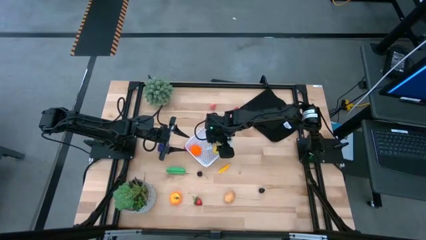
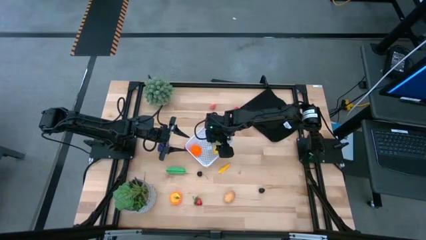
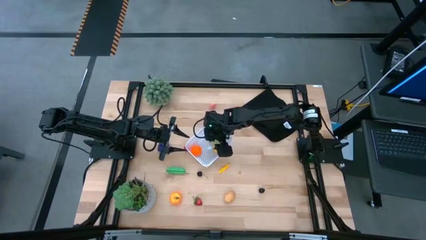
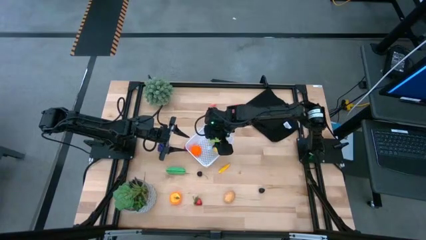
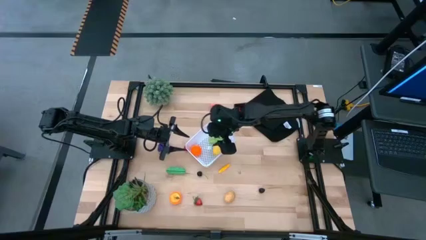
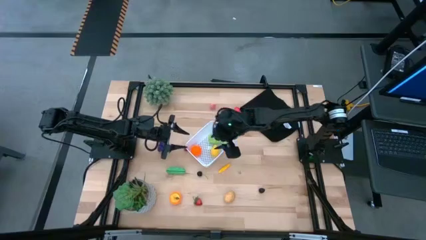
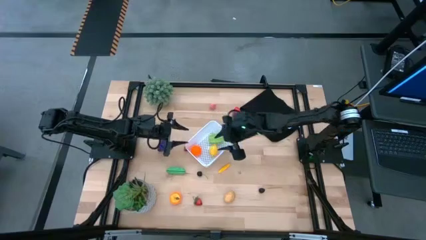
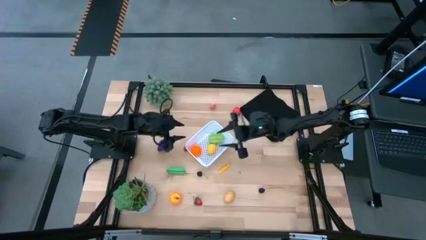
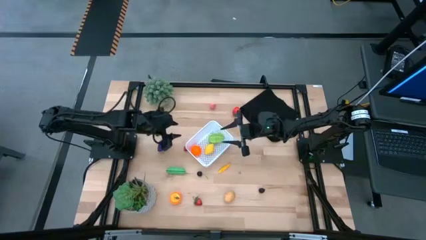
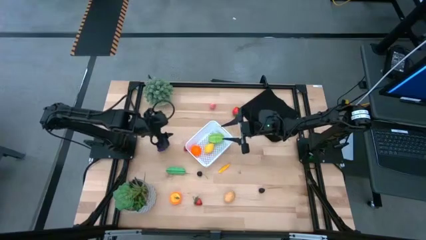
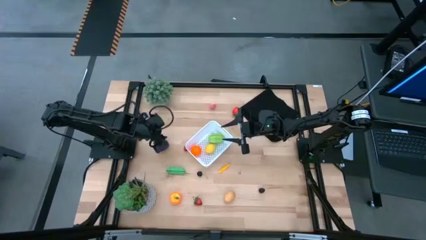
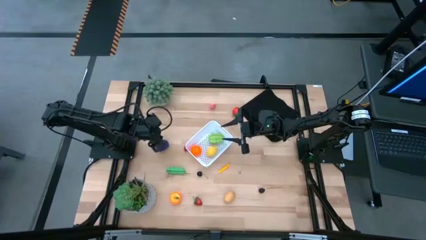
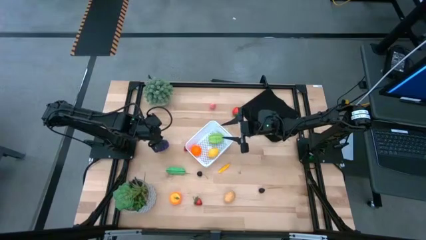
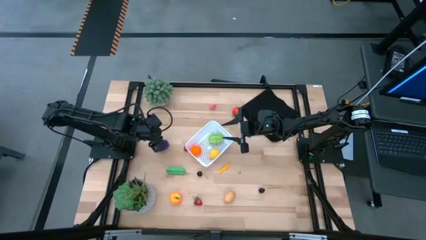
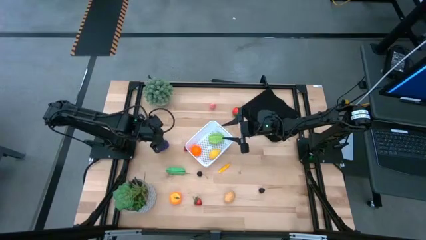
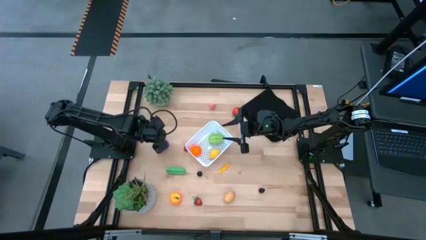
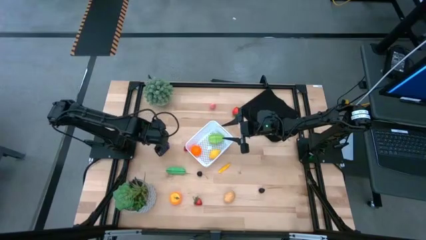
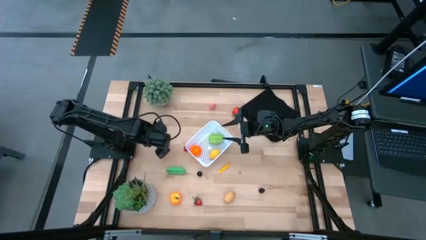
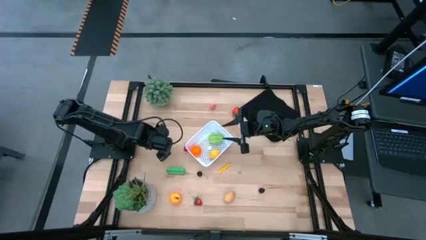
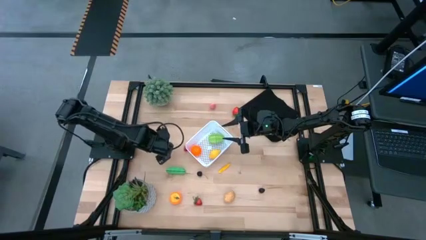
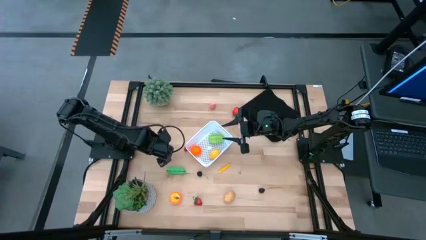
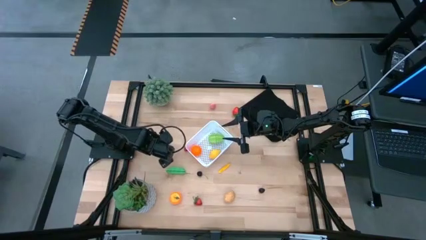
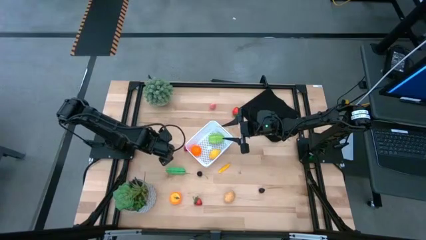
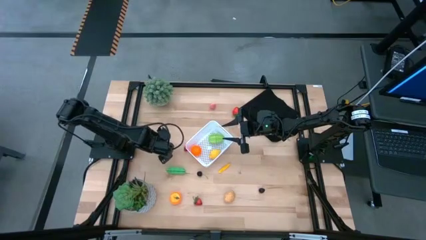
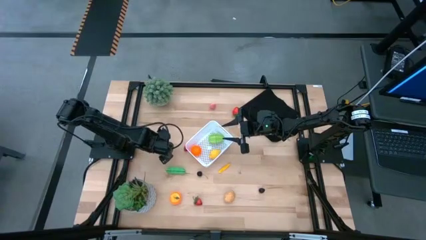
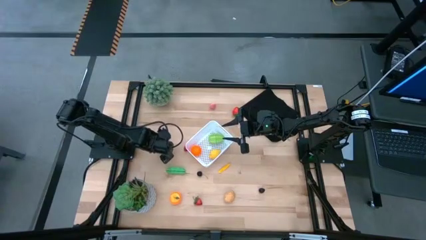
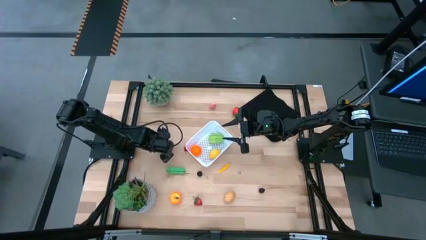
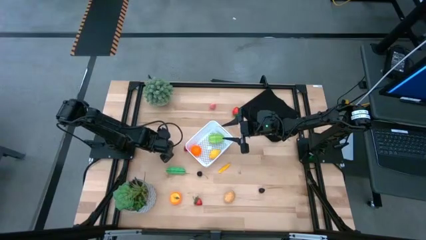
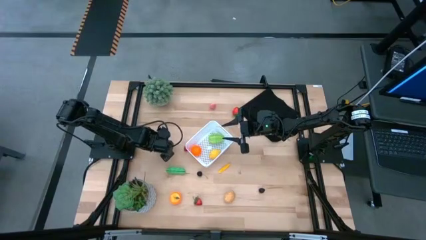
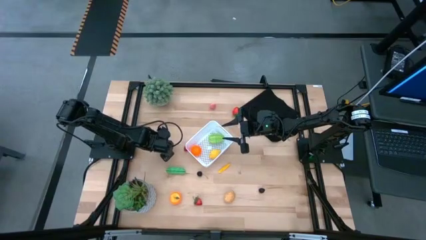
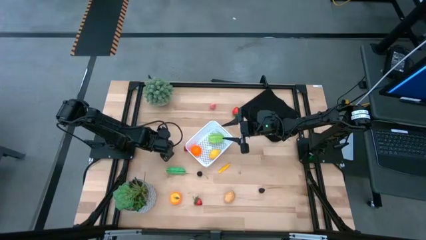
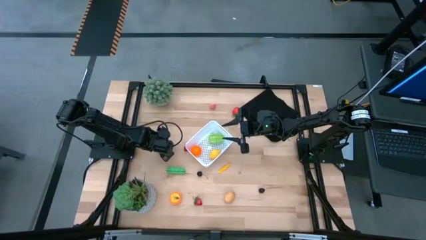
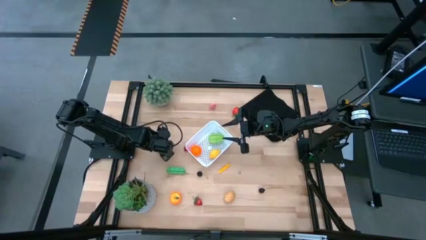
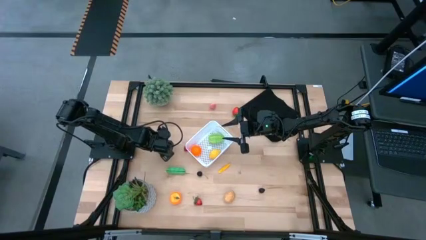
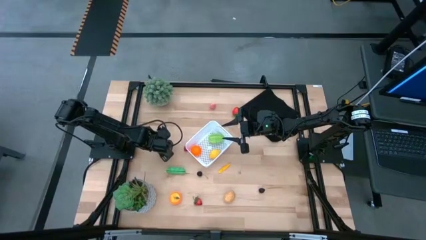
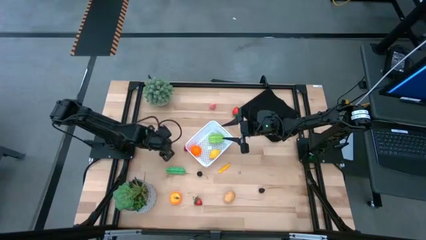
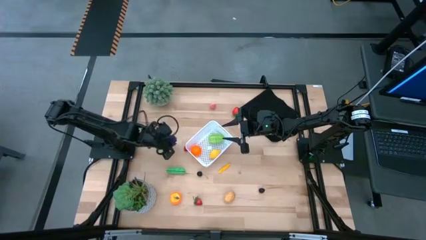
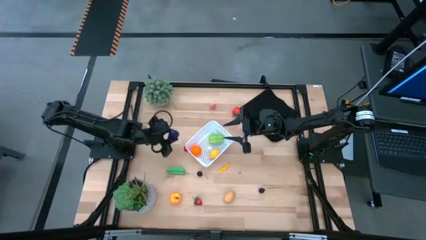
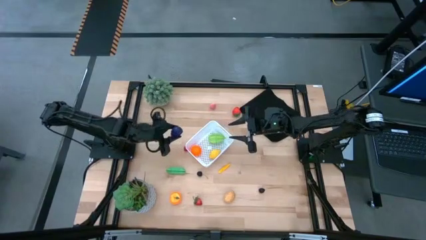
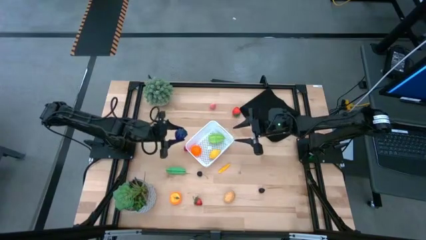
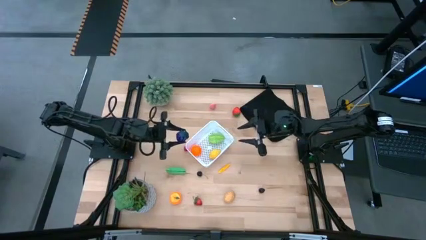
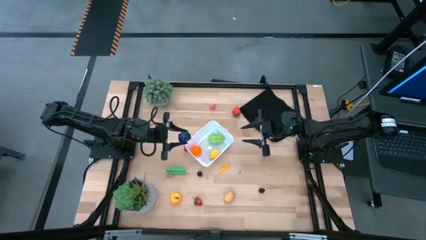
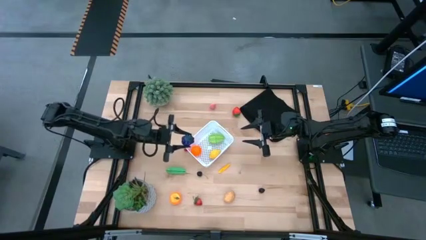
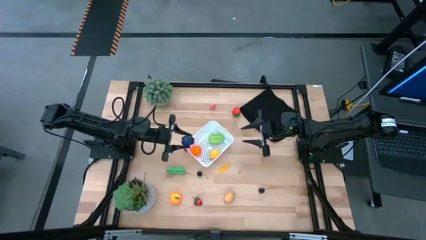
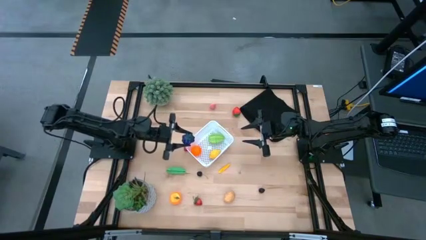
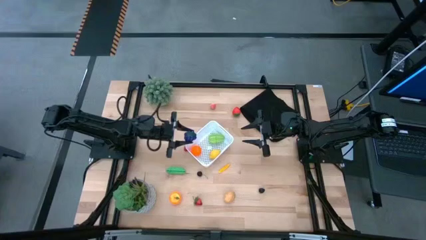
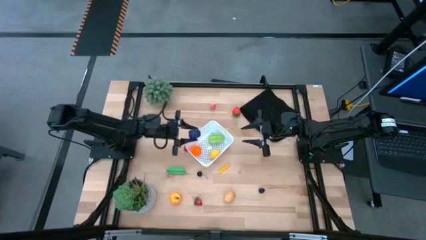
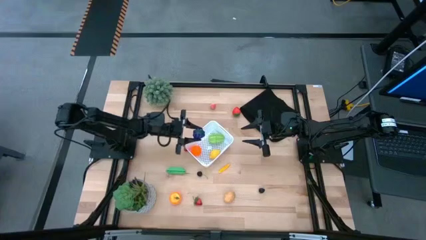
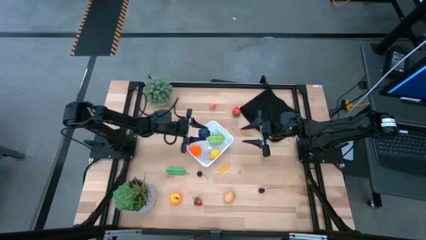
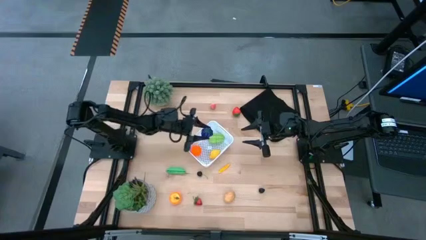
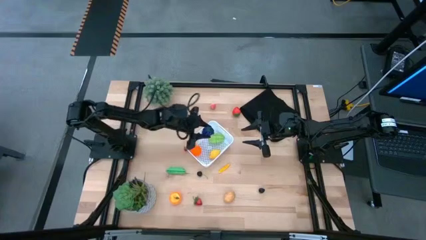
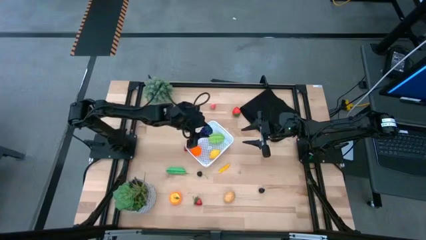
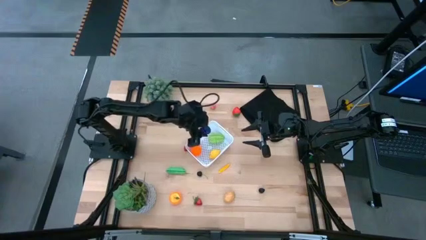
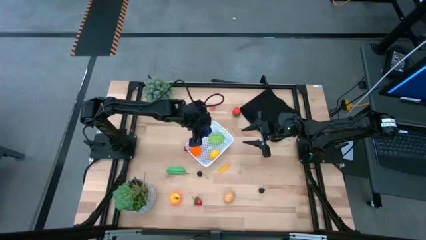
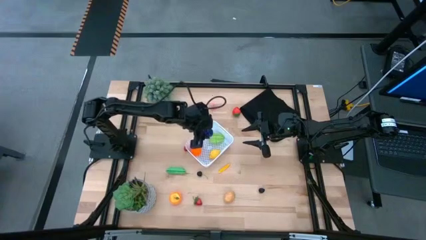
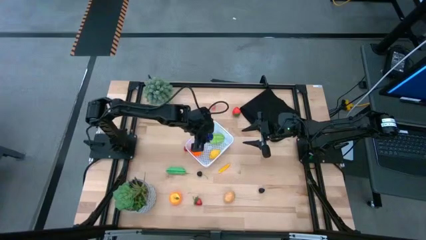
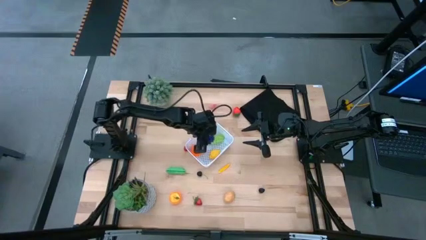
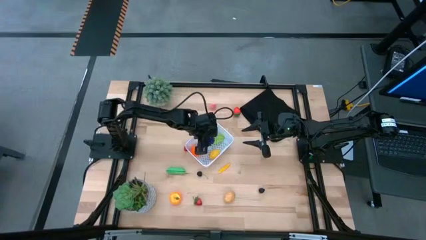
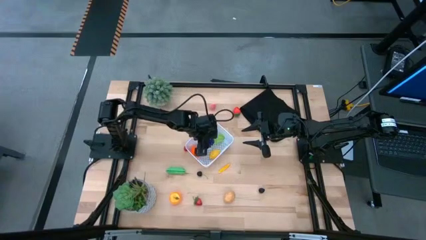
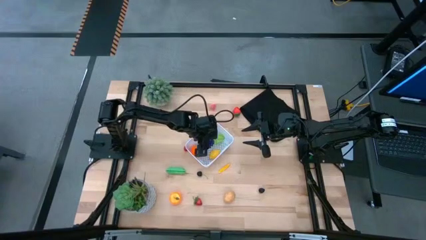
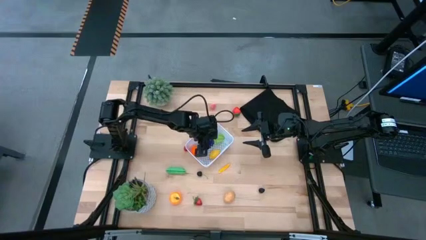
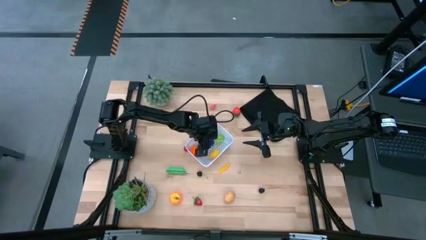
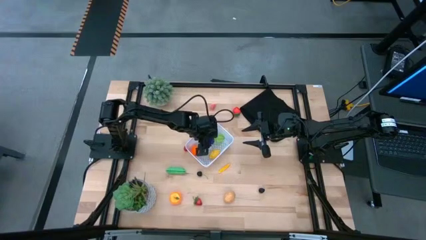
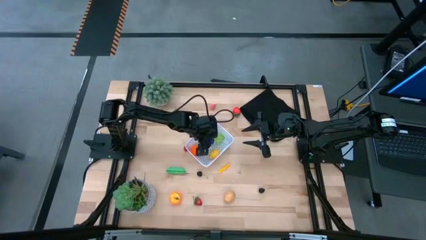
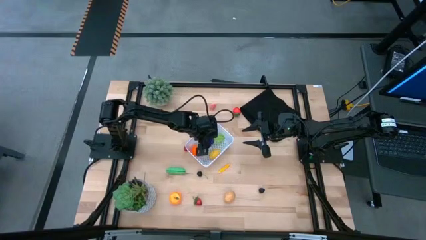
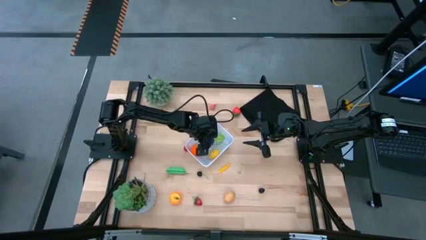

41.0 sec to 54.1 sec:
Task: Pick and placing Produce into tupperware
Put the grapes into the white bin

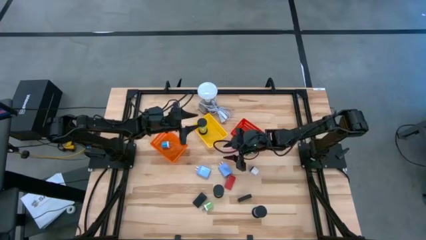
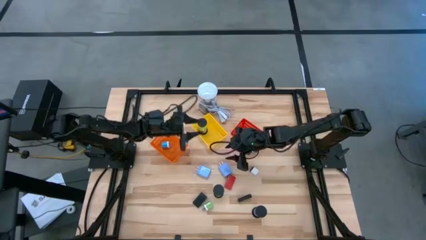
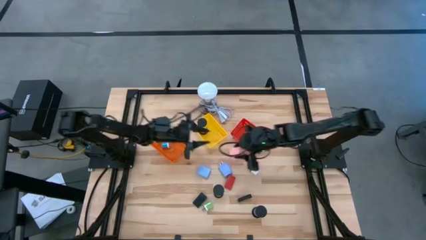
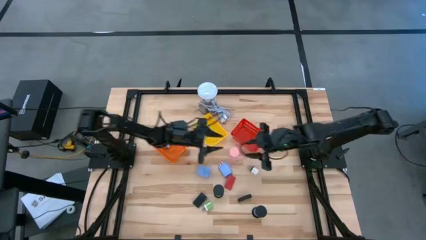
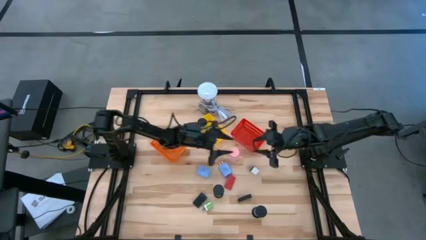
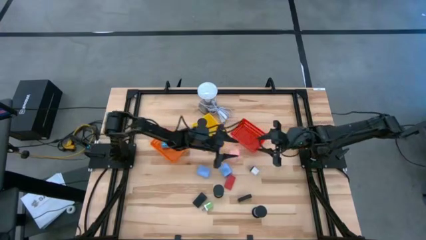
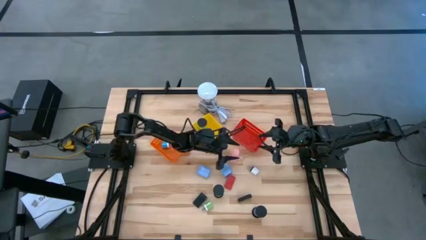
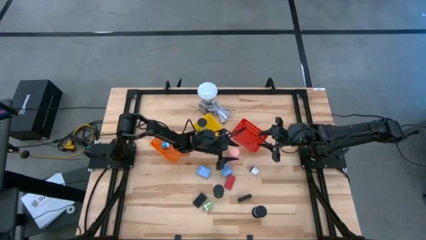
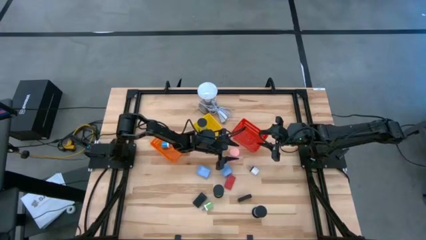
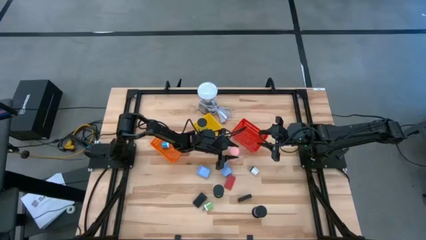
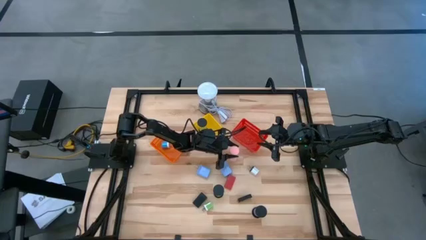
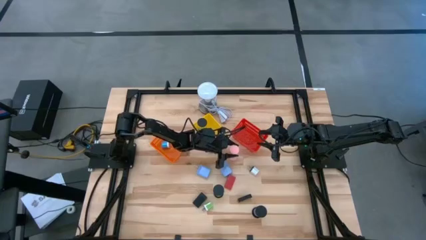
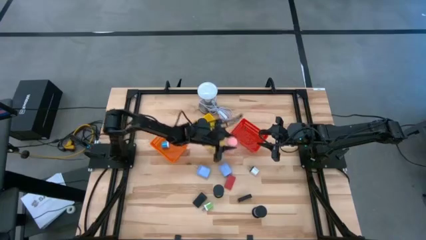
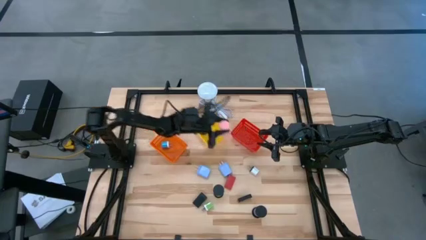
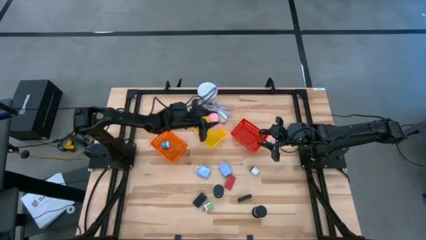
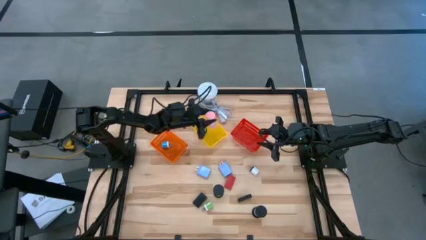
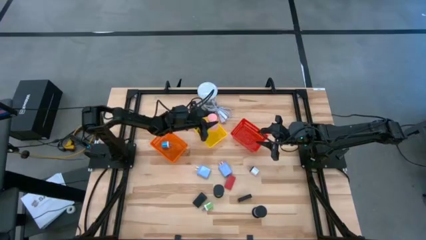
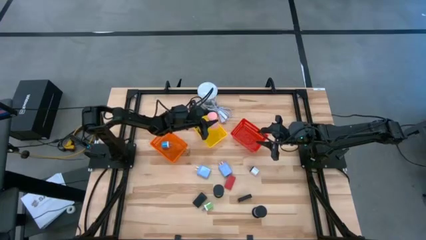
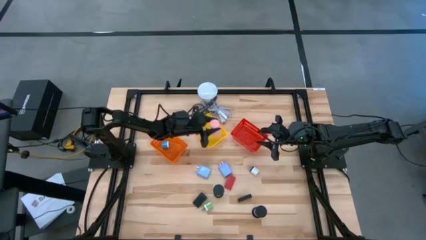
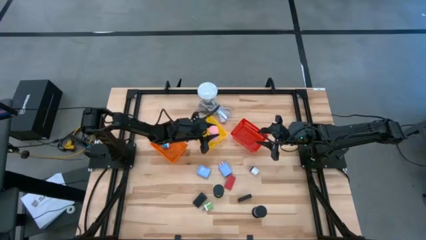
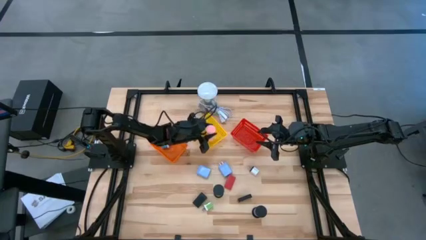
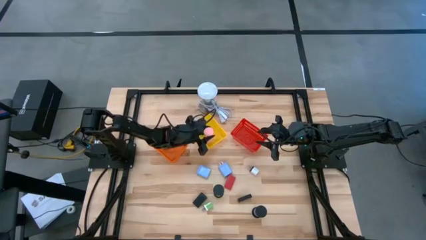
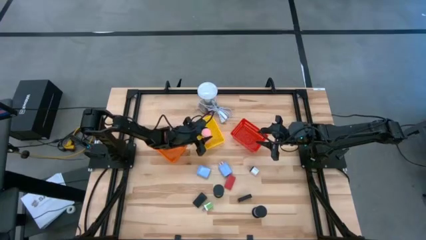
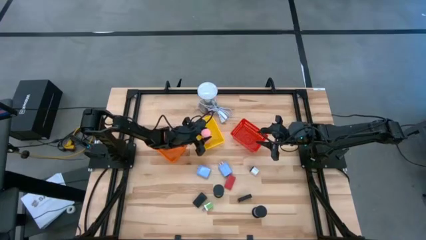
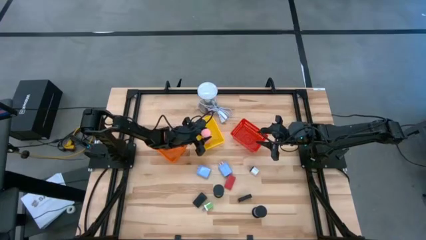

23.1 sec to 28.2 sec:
Task: Pick & Place Office items
Put the pink hourglass into the yellow basket
